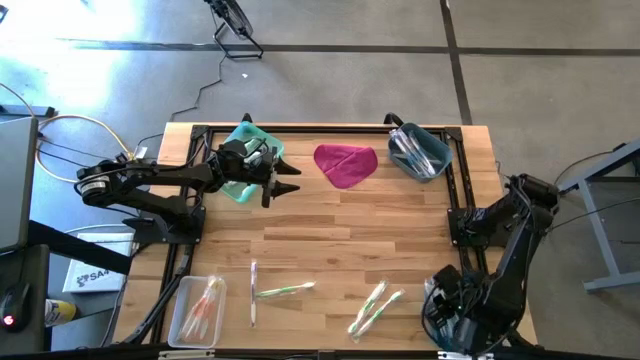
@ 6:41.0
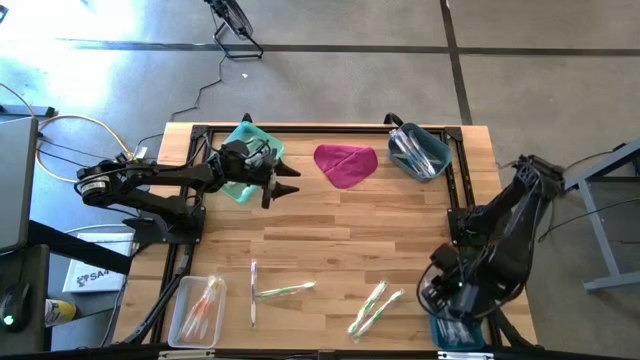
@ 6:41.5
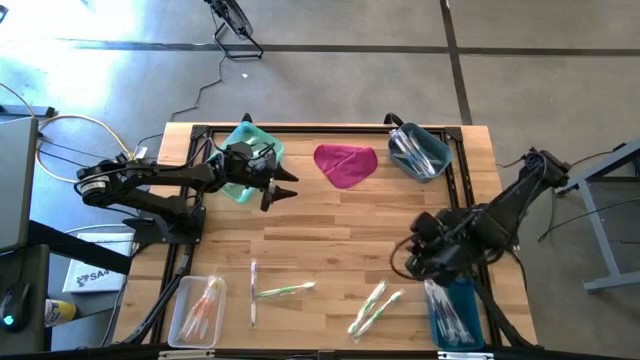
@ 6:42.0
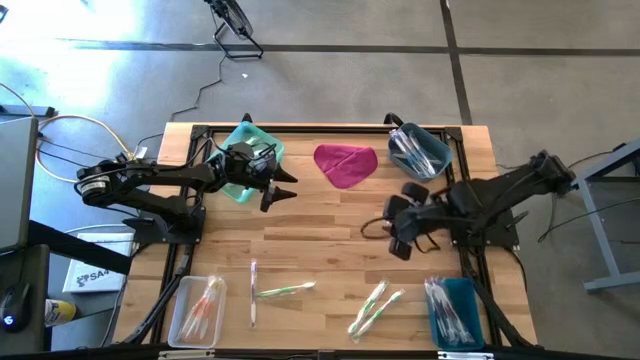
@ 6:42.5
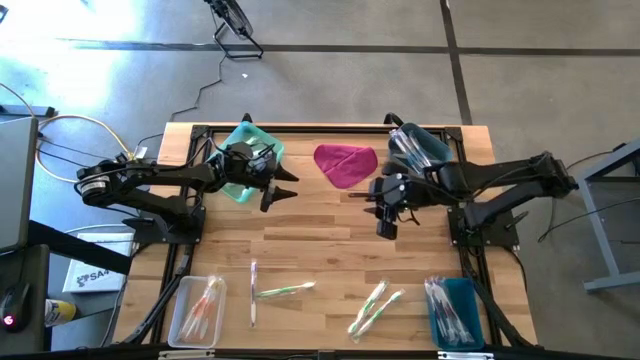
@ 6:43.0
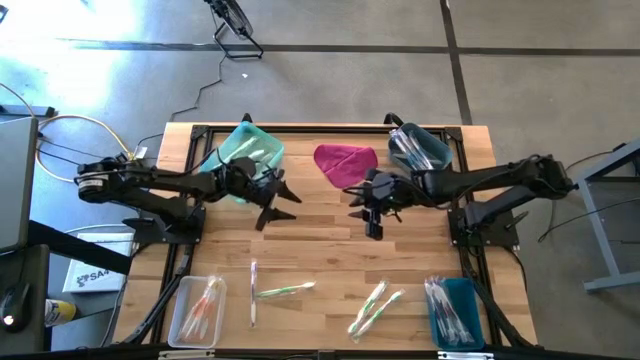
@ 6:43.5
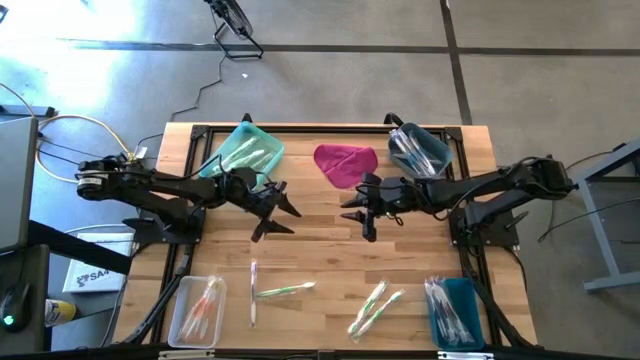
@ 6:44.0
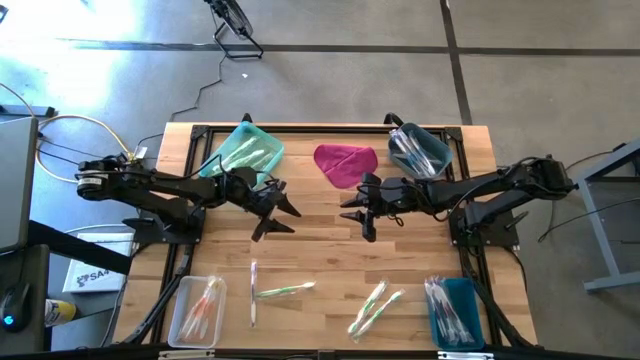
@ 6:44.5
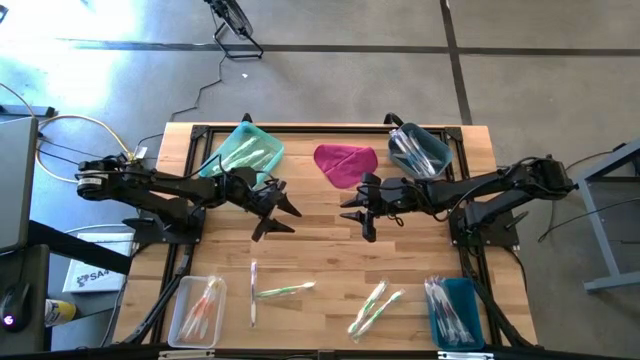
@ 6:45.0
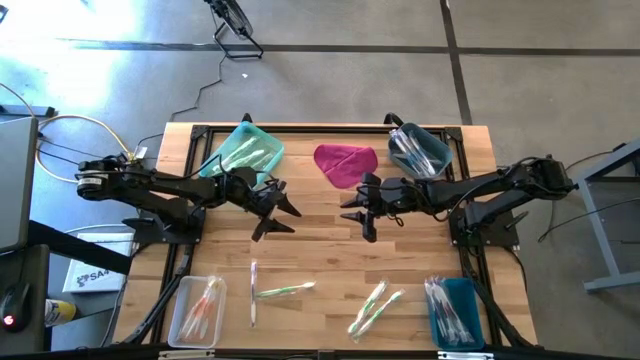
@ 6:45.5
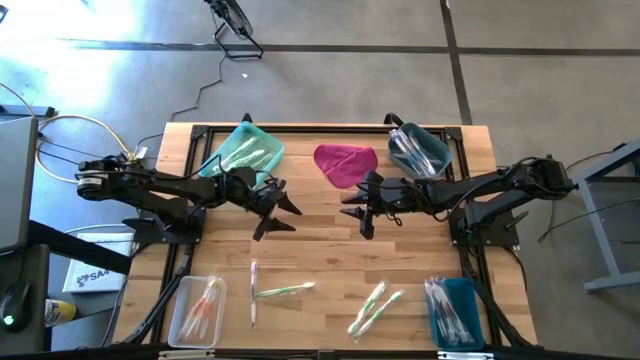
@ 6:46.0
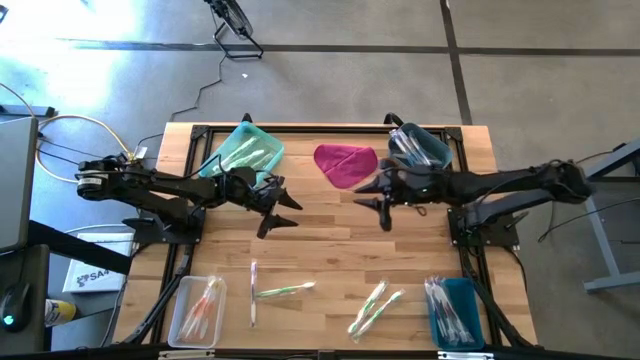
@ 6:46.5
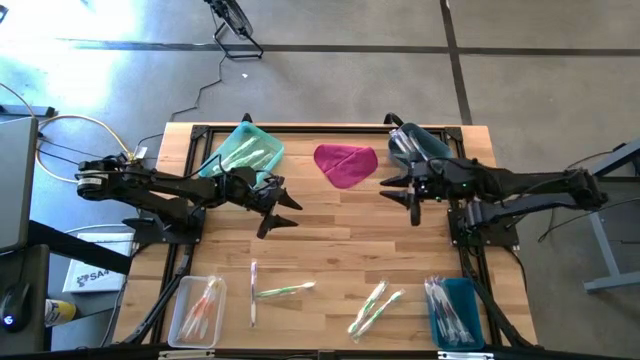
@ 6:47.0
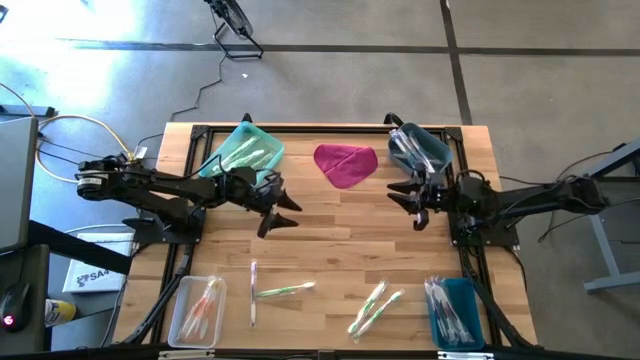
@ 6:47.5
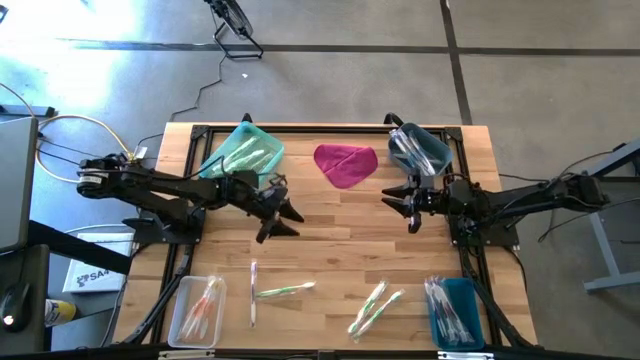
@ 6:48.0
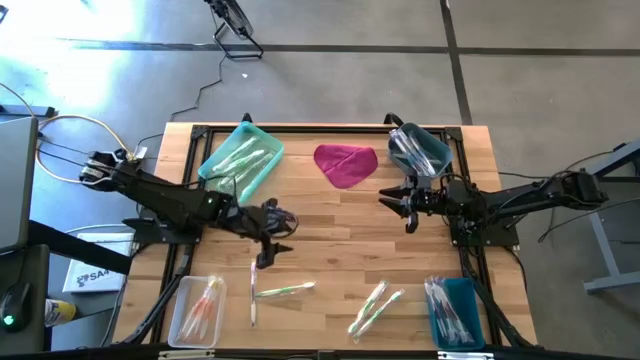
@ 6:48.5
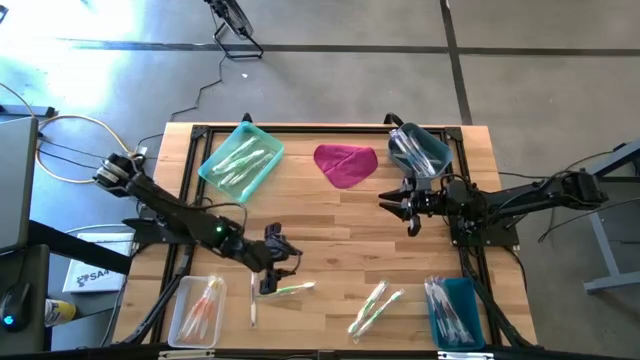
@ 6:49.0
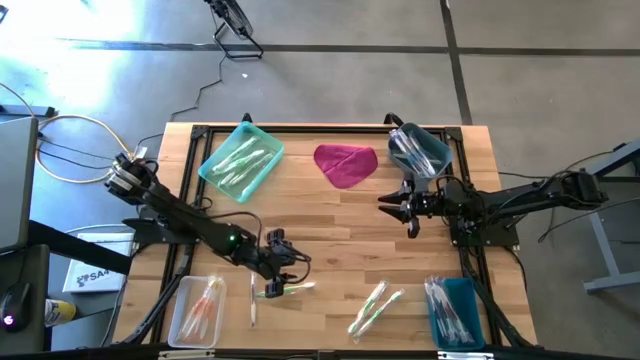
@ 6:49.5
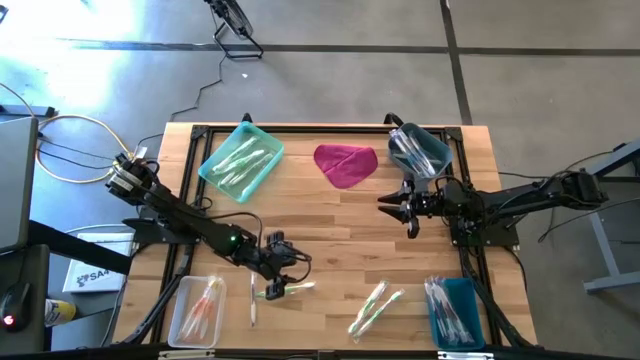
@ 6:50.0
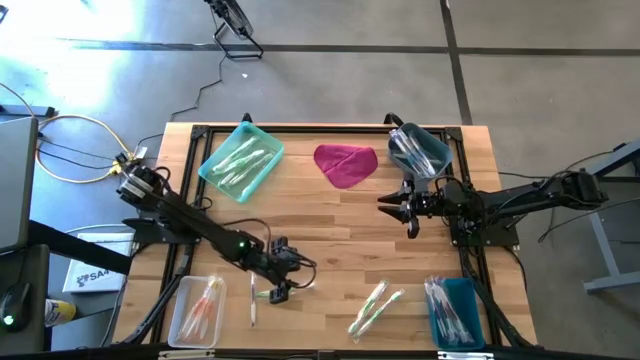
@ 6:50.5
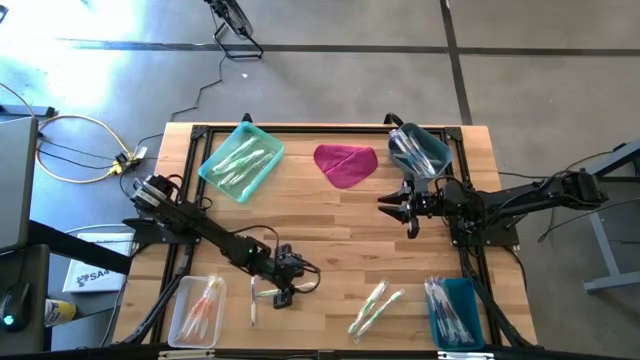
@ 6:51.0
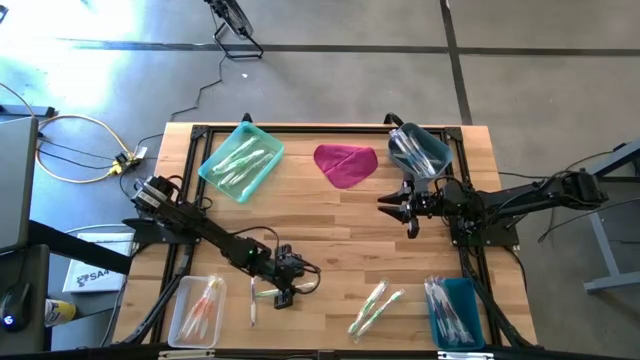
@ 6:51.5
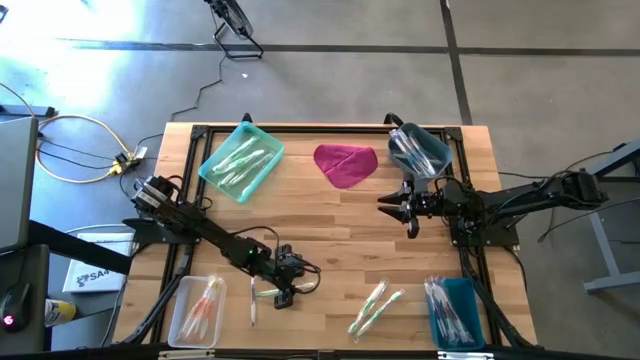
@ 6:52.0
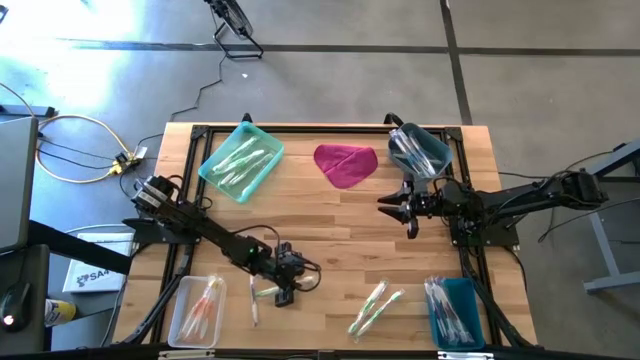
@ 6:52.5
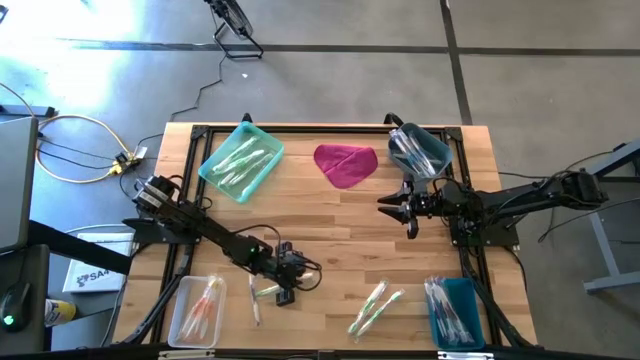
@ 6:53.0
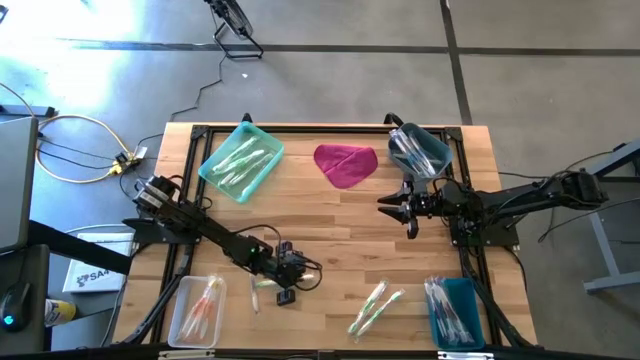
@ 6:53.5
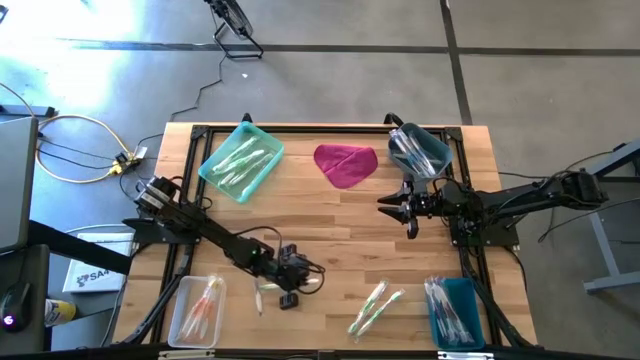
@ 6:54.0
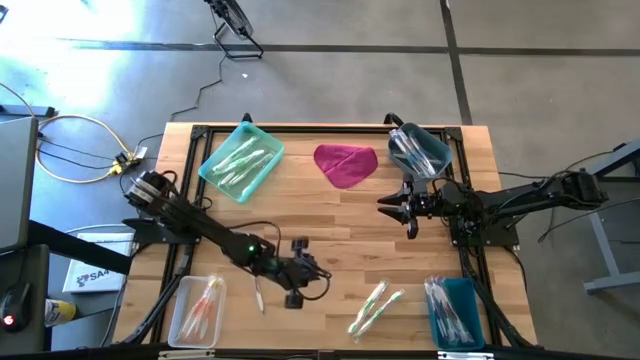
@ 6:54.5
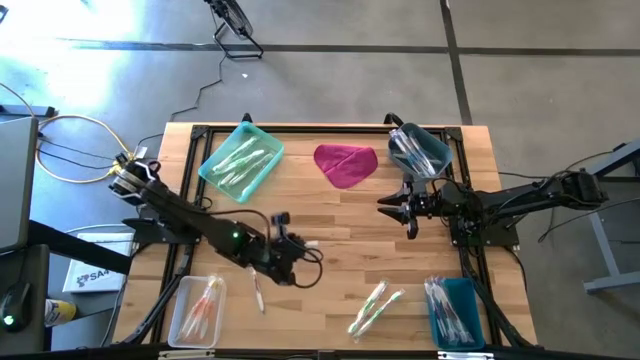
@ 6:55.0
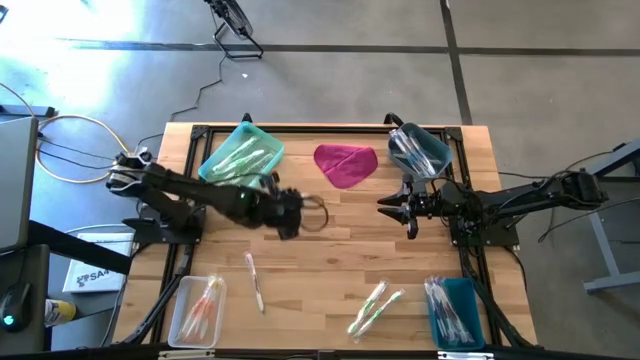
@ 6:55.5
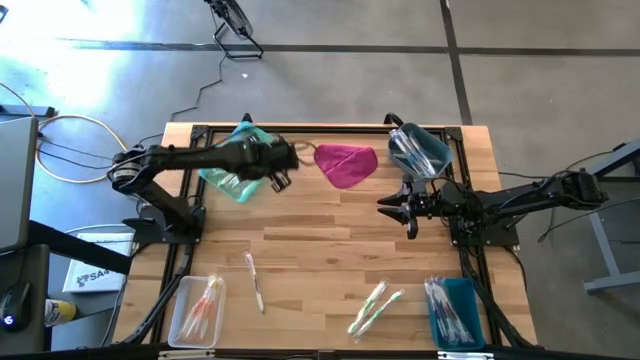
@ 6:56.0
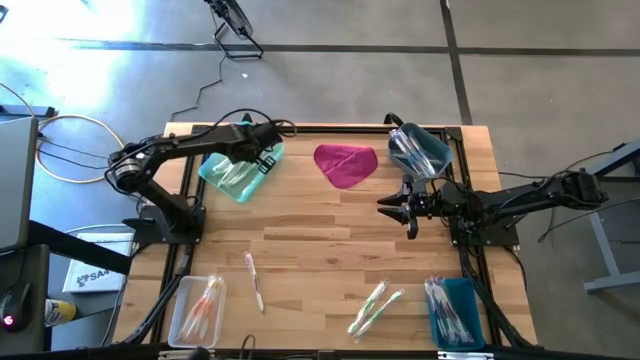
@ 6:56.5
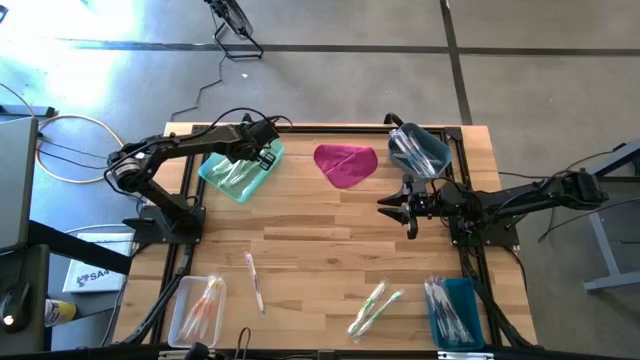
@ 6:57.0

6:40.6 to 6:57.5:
Task: Pick & Place Toothbrushes
Put the green toothbrush to the green bin

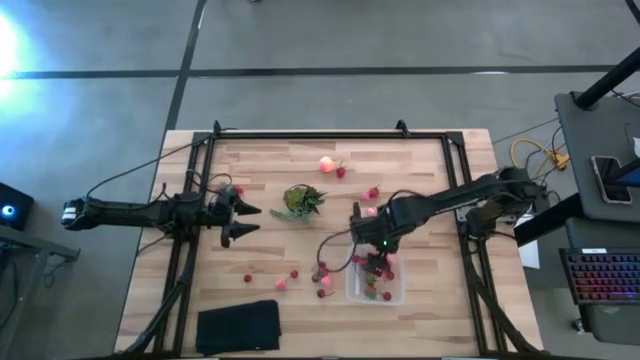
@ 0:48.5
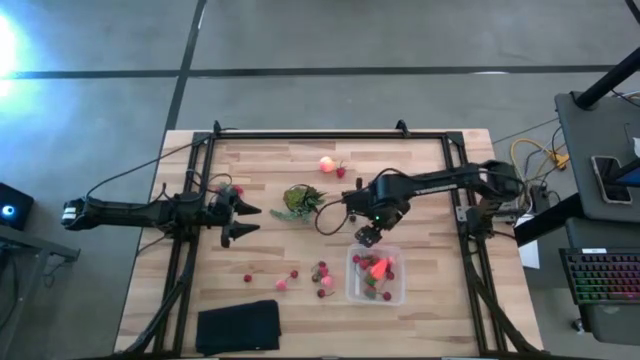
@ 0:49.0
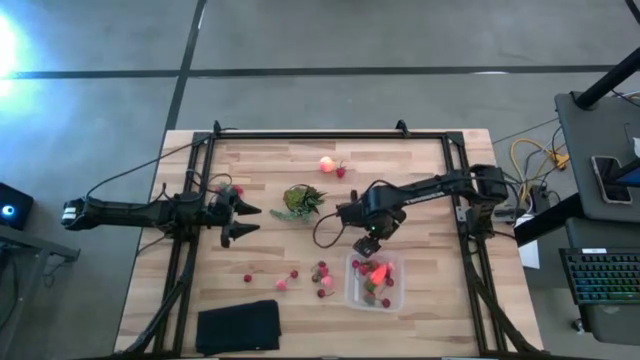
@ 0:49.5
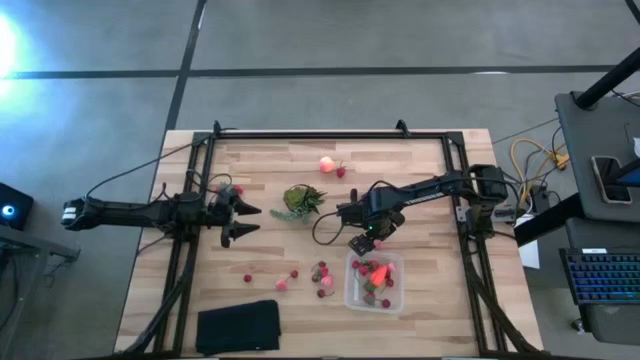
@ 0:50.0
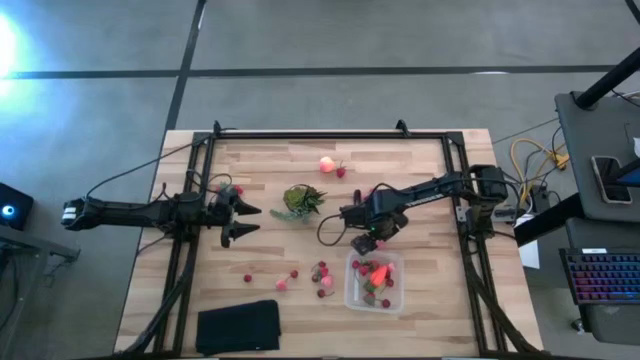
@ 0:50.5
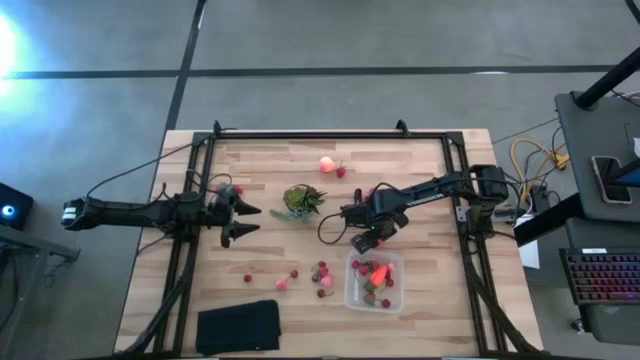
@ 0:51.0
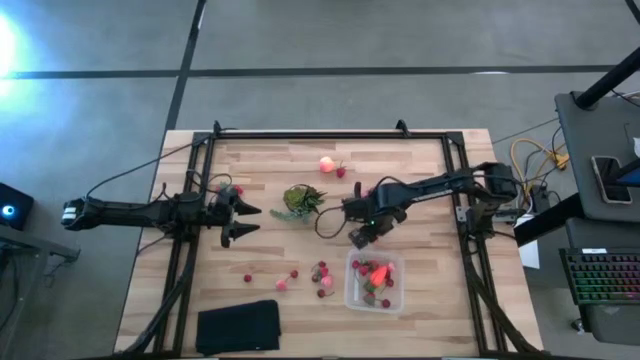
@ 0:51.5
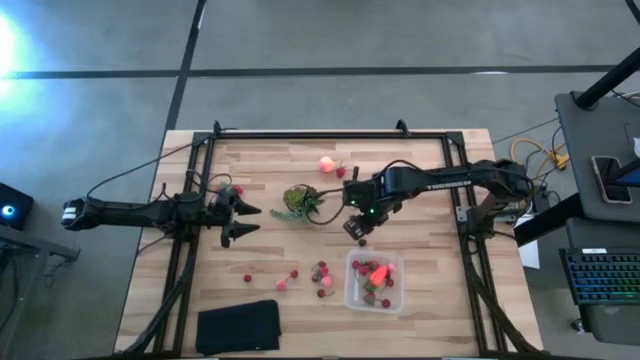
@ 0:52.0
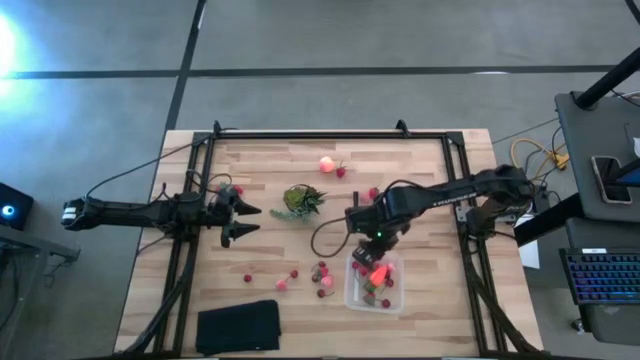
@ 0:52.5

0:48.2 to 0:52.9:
Task: Pick and placing Produce into tupperware
Put the apricot into the bin

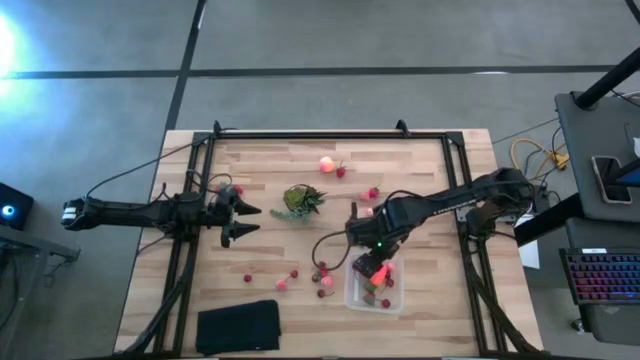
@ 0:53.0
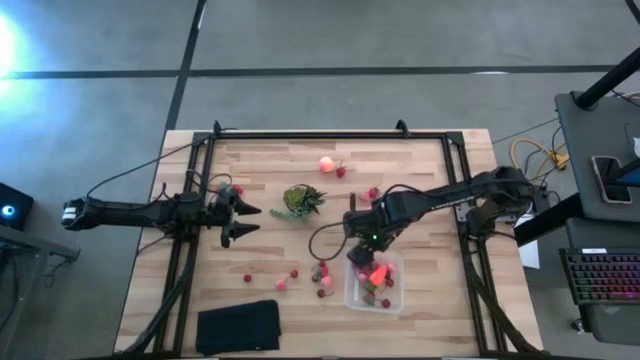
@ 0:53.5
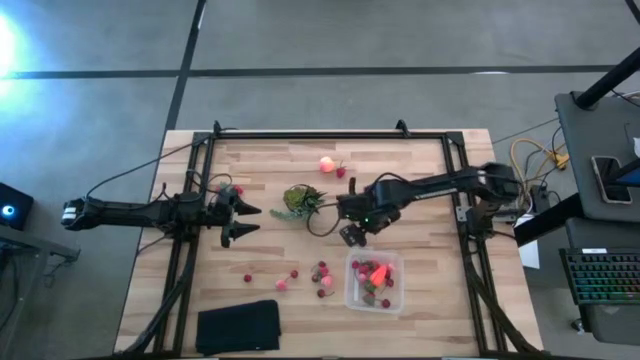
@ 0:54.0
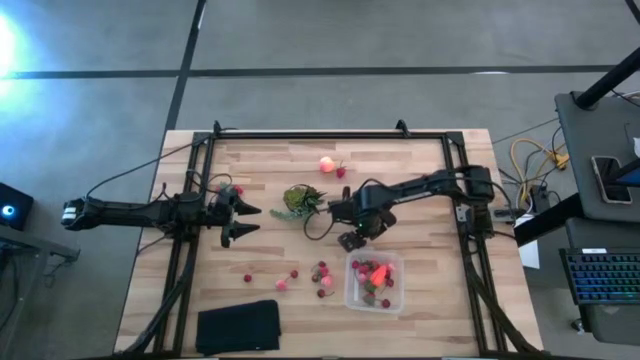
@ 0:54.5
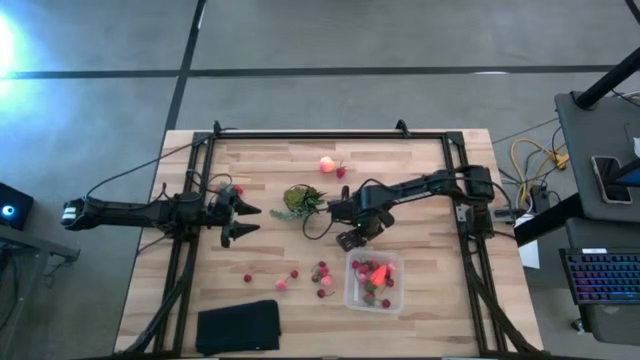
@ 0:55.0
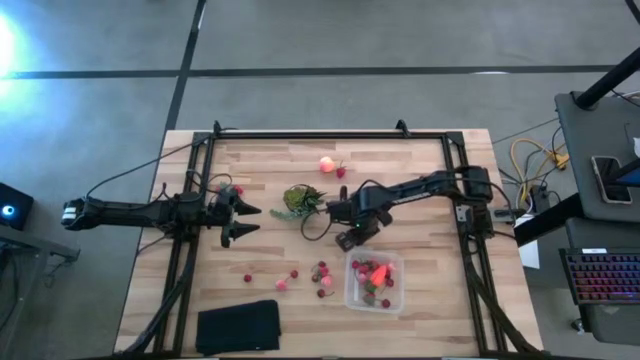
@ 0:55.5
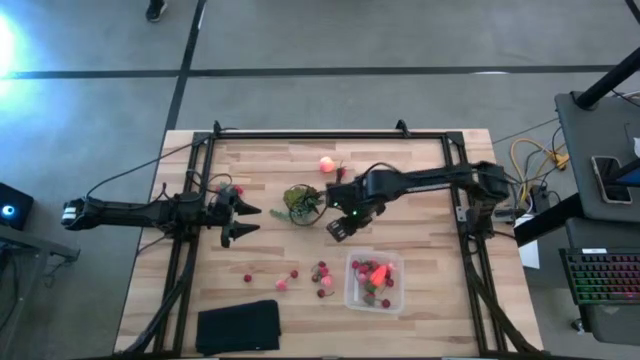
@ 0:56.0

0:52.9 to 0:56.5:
Put the plum into the bin
